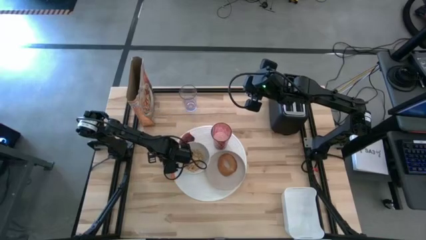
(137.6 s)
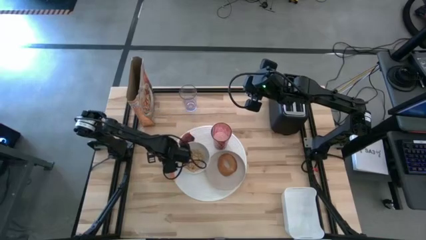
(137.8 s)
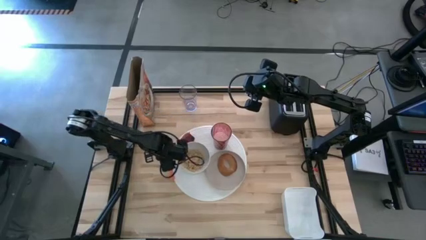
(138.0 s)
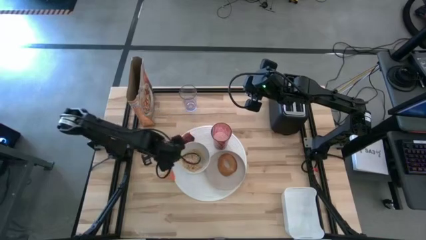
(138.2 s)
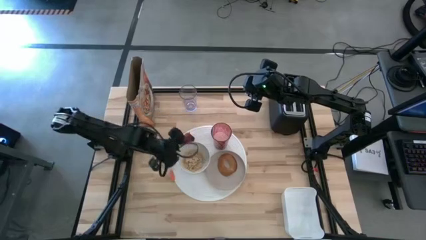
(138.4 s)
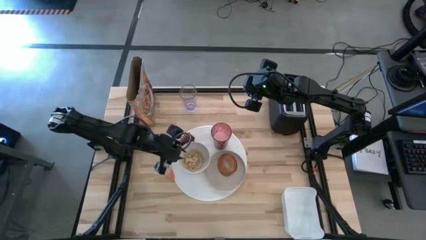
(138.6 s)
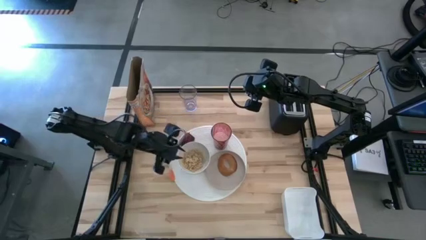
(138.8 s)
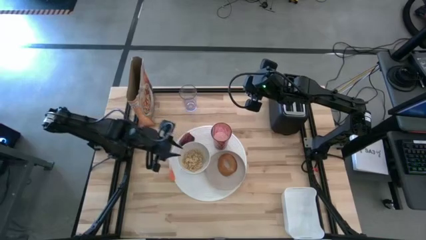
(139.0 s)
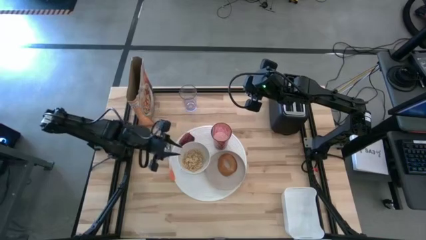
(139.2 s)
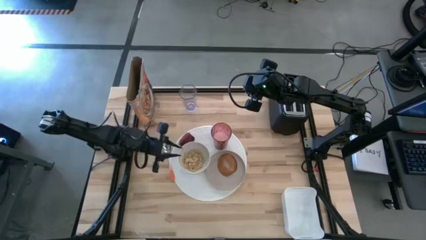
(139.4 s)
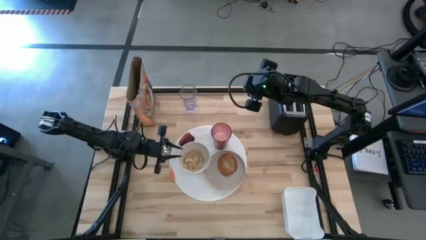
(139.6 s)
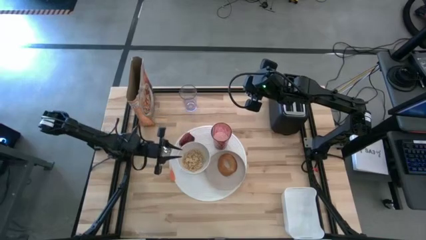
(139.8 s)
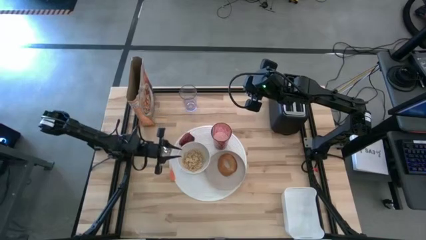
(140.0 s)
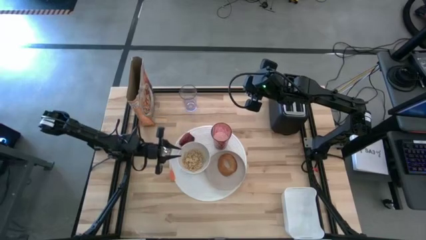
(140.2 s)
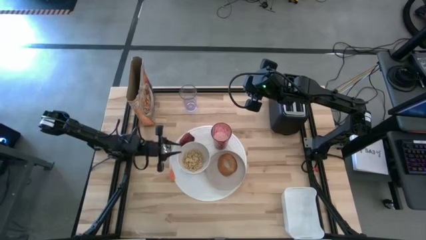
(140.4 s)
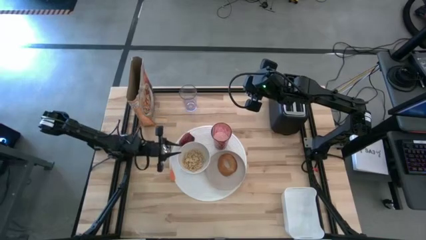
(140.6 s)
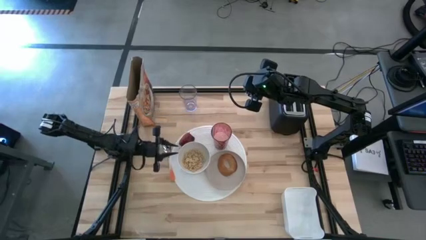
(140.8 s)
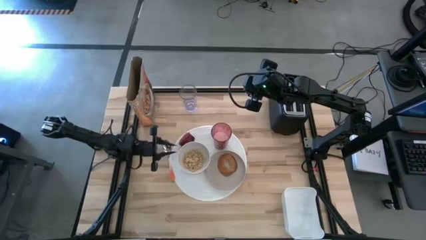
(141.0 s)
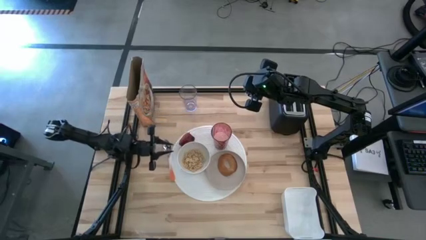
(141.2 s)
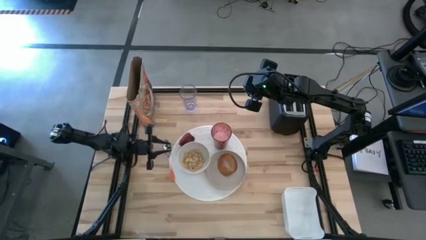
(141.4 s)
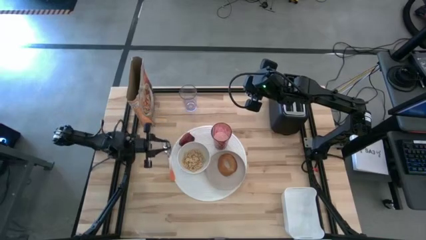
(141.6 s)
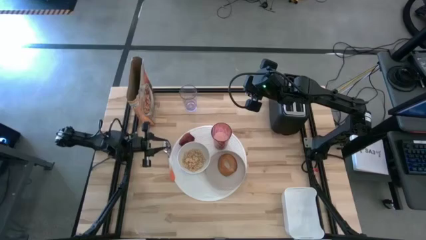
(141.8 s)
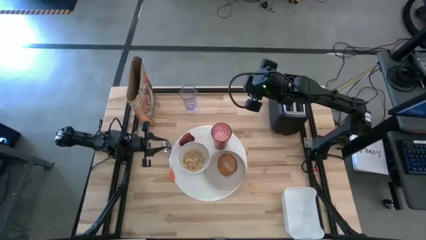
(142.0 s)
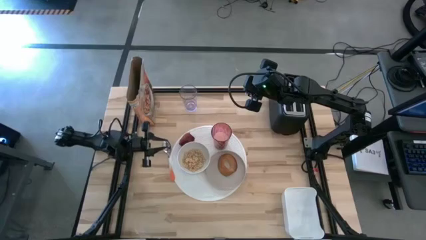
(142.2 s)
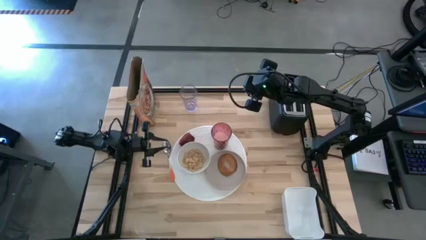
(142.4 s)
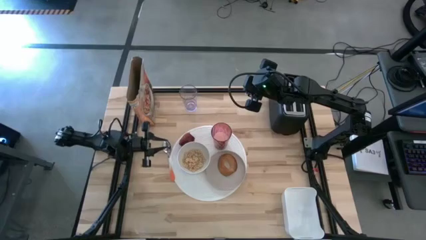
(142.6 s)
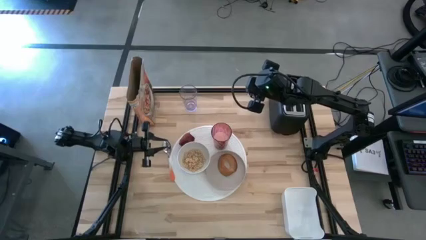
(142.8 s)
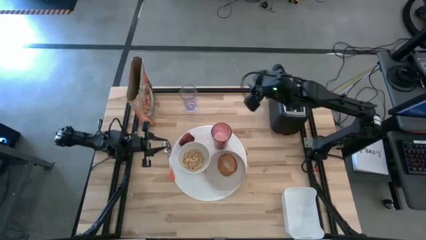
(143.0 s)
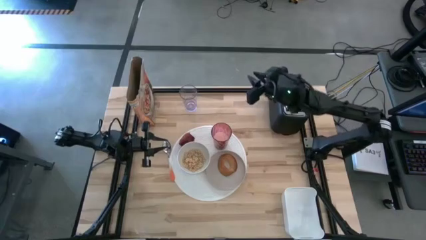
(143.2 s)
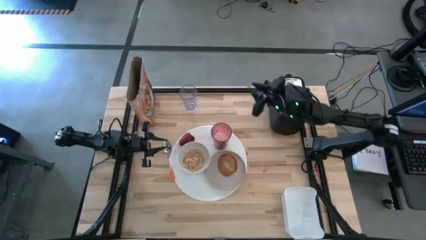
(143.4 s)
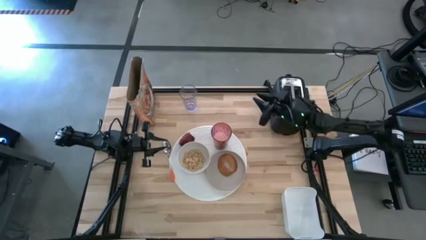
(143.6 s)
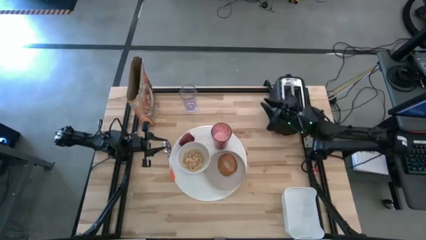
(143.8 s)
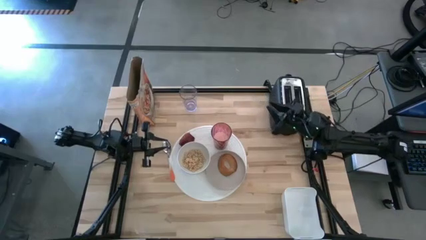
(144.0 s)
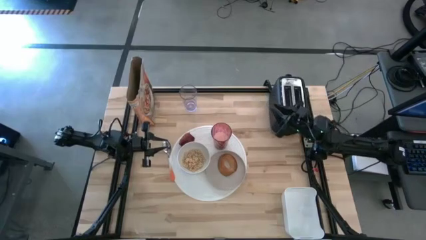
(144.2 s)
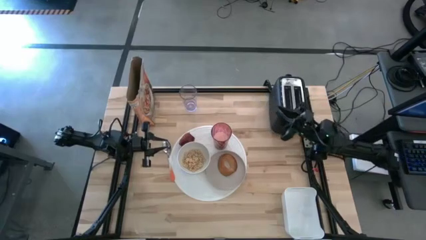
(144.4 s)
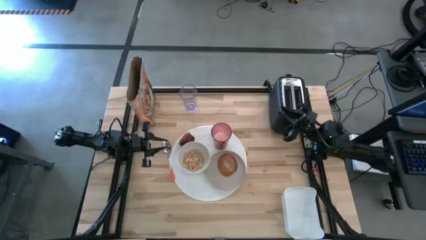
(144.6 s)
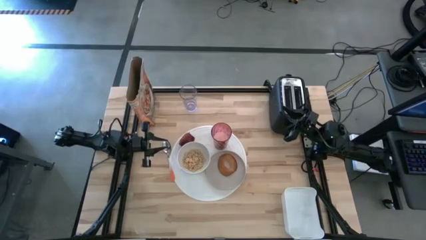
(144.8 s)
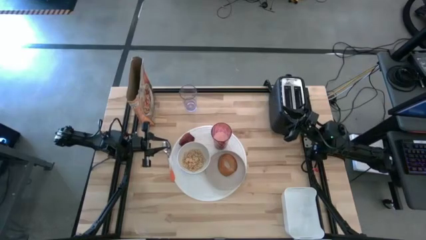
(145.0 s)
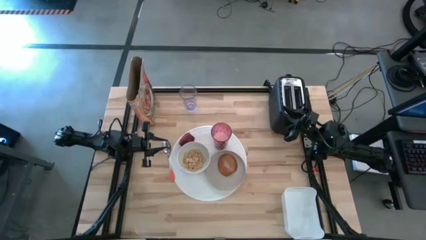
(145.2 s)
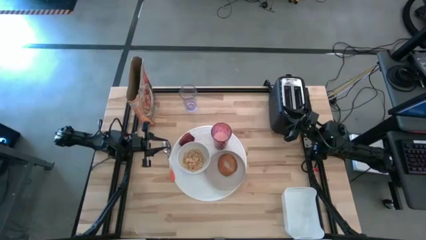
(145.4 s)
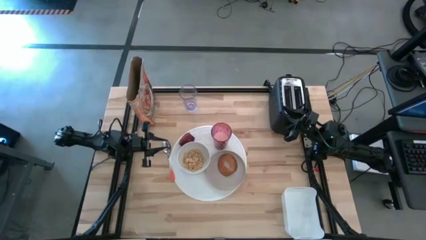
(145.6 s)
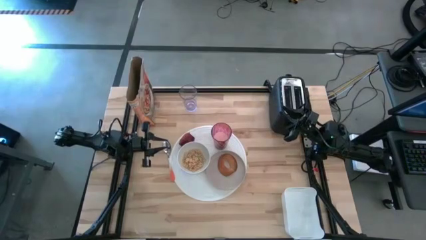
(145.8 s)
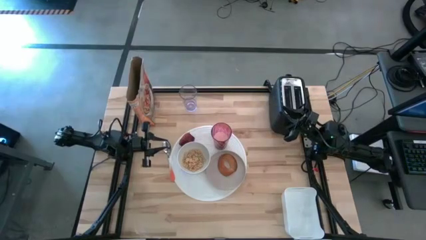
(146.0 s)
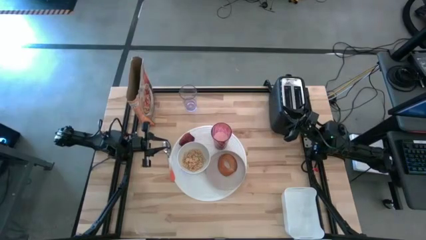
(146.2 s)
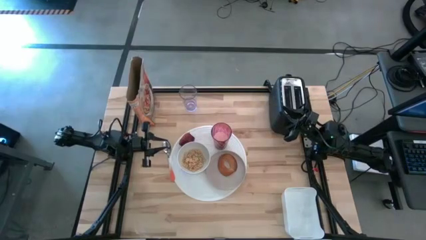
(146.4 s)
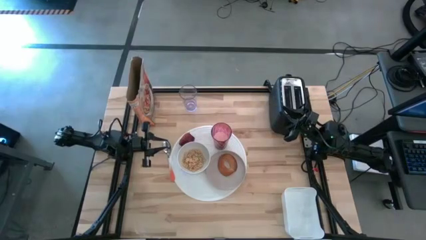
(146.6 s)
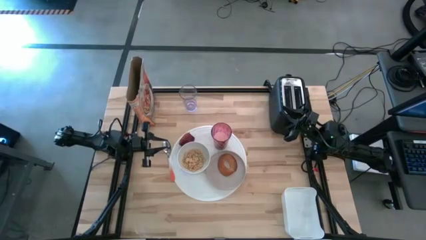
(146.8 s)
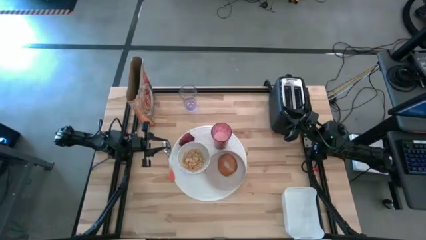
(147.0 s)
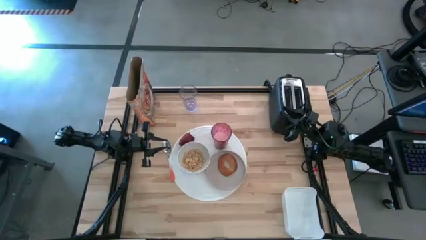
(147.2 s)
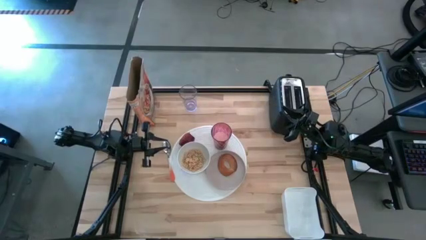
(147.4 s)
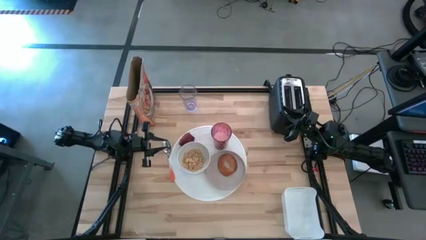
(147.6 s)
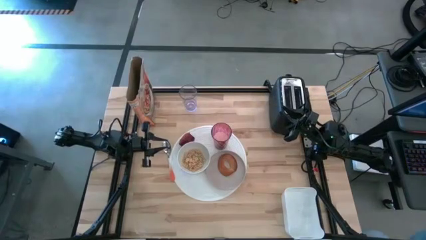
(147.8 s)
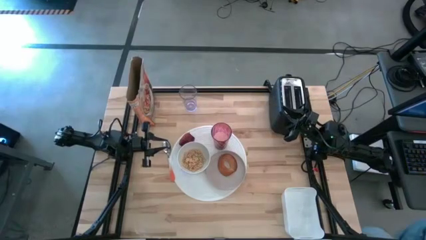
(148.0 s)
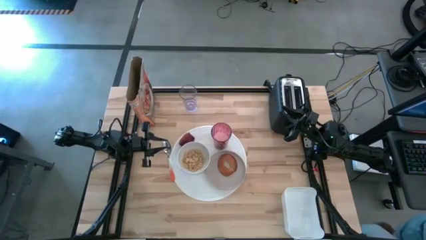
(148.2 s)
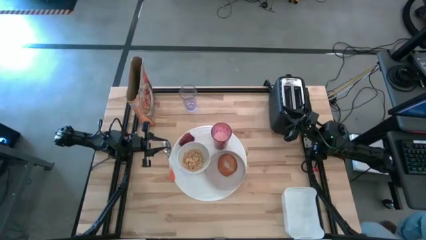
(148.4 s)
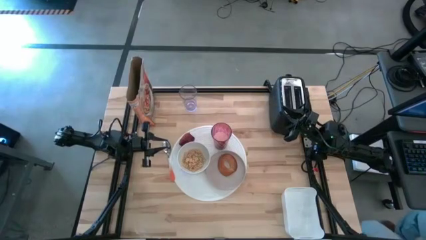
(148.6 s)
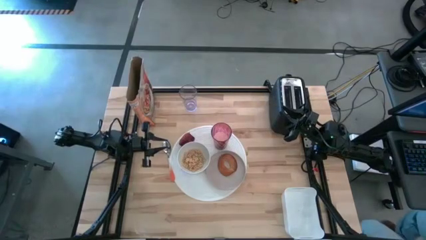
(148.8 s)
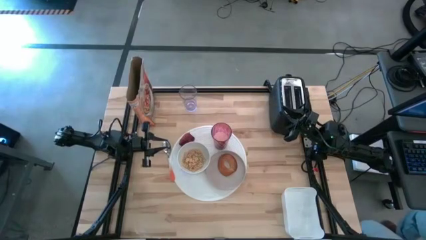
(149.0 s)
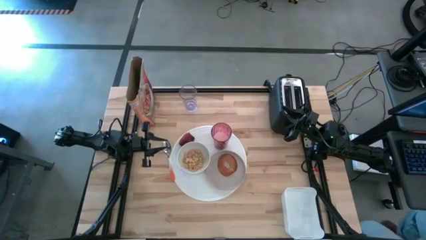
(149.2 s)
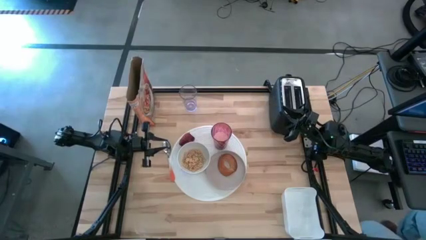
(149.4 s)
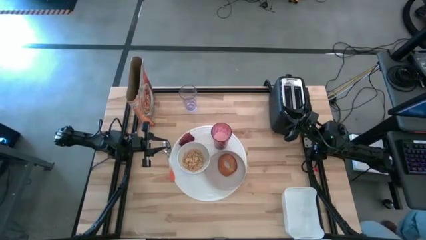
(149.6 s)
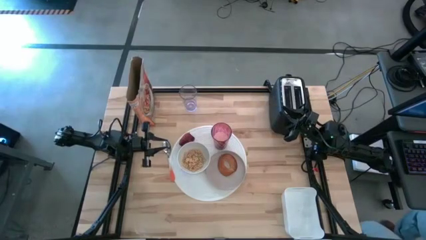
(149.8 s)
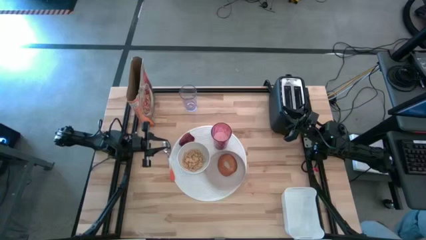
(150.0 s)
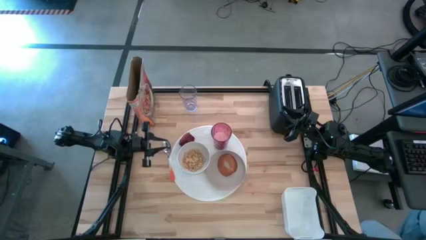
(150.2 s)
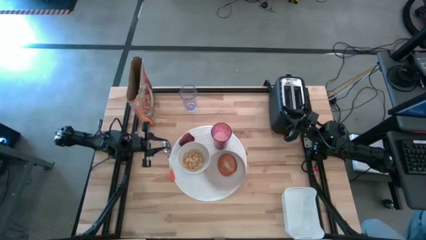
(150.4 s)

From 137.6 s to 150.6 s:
Task: Arrange a breakfast setting
Return to Home Position

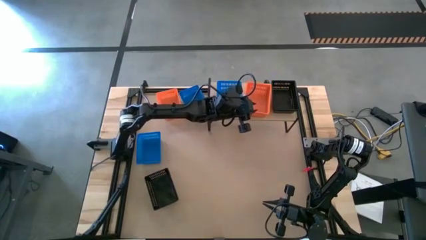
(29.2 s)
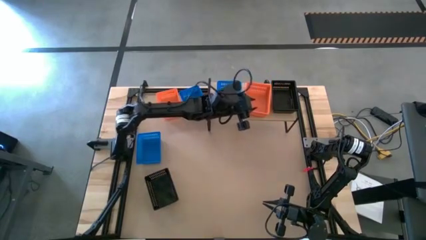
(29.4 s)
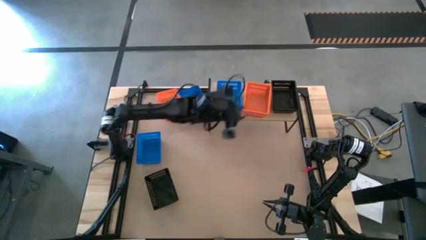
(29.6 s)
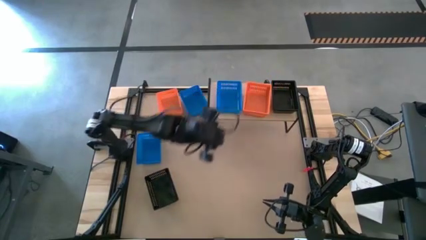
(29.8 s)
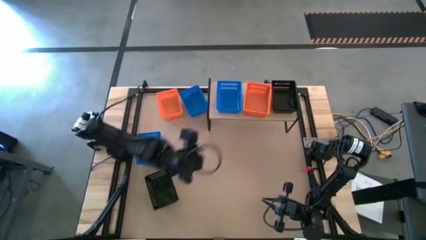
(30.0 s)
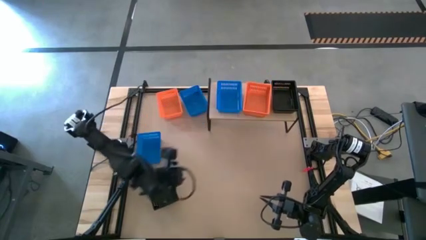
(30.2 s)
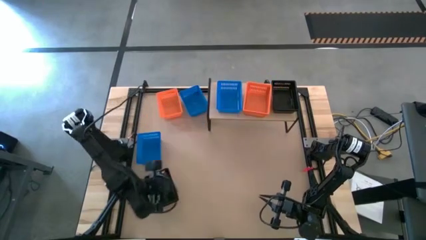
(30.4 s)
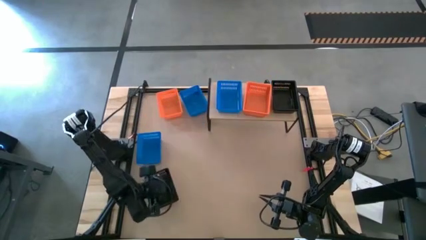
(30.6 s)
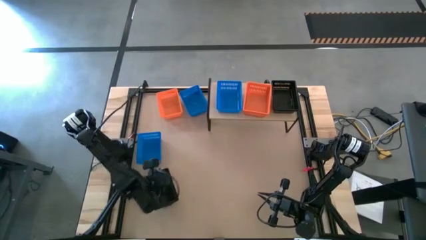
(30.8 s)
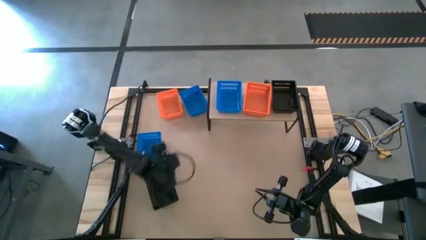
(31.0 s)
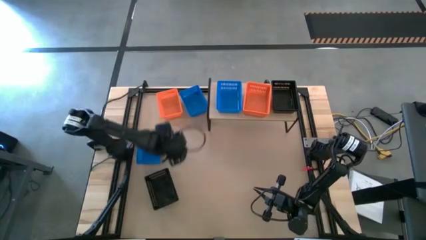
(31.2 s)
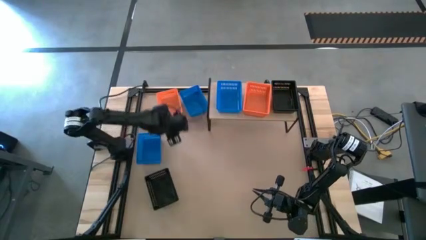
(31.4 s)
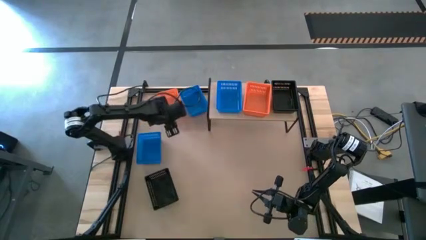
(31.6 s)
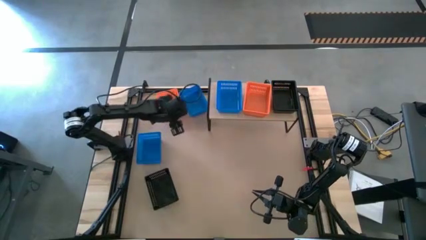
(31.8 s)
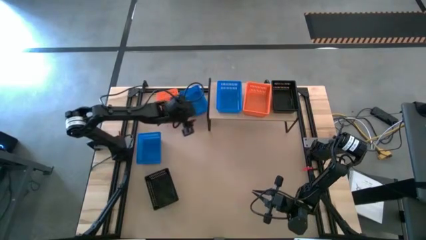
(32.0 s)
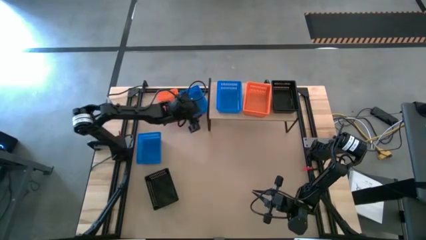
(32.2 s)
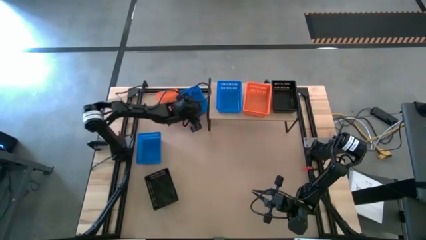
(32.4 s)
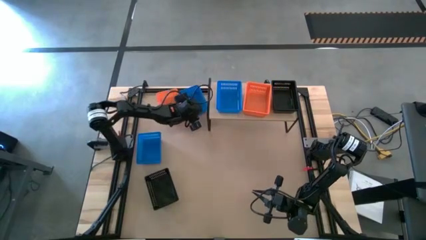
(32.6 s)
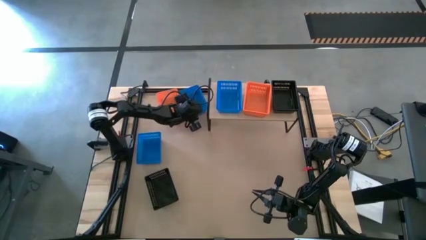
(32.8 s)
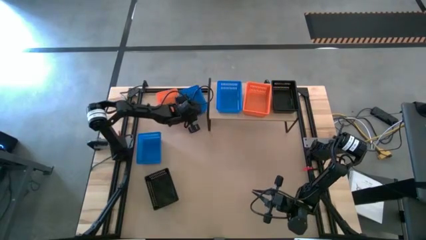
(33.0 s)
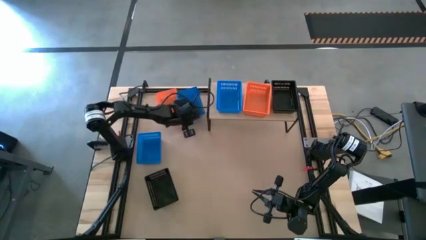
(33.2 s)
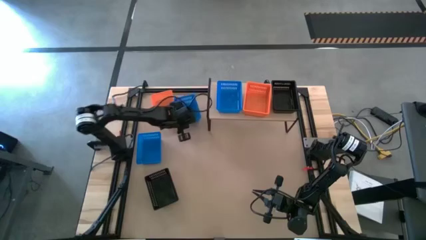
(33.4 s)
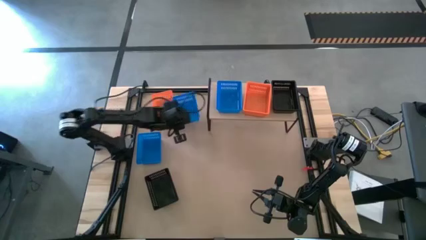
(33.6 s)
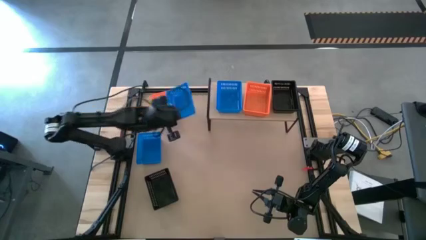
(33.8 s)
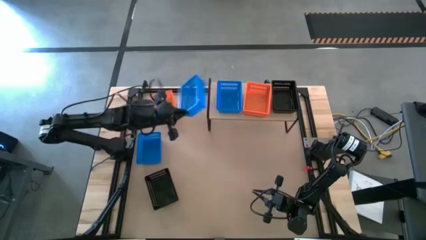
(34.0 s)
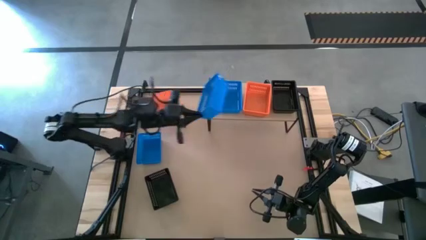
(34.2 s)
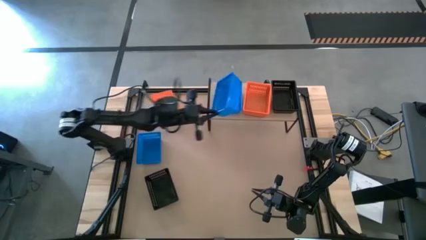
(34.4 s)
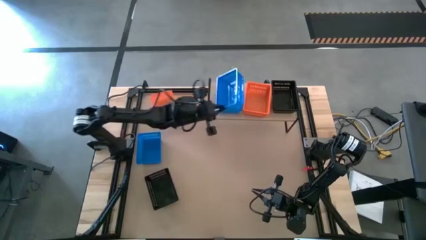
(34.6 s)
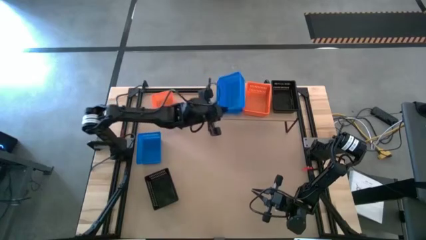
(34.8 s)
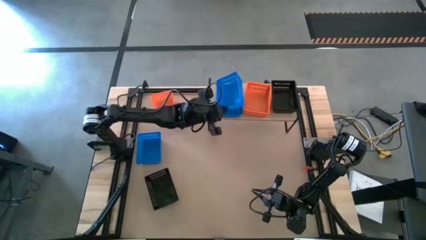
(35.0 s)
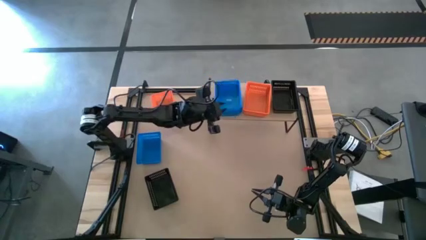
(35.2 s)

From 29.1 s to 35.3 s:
Task: Stack baskets on shelf by color
Stack the top blue bin on top of the blue bin on the shelf
